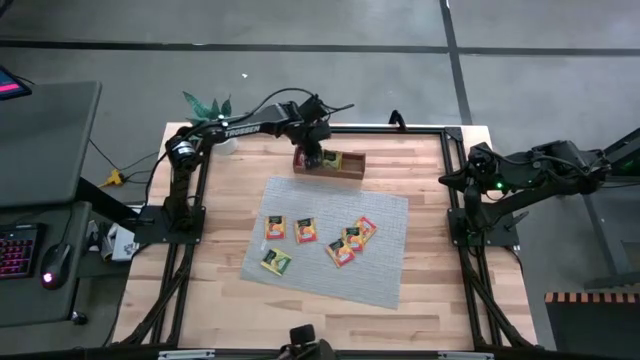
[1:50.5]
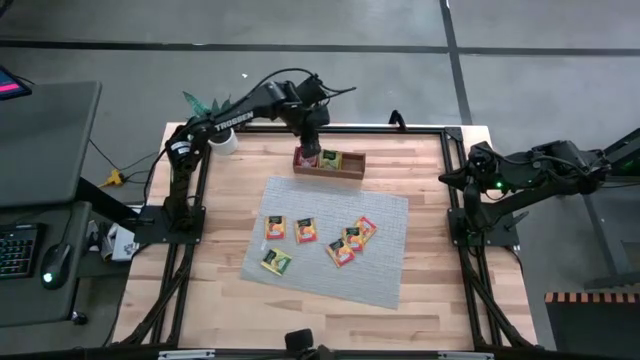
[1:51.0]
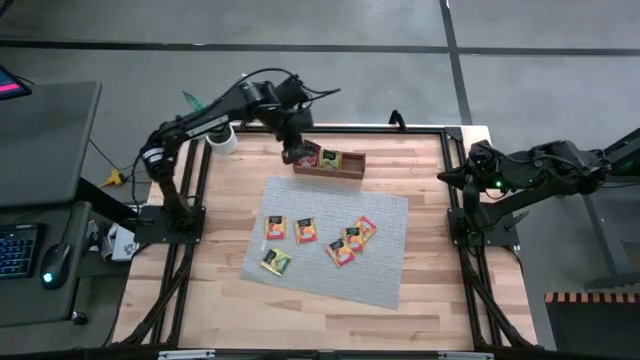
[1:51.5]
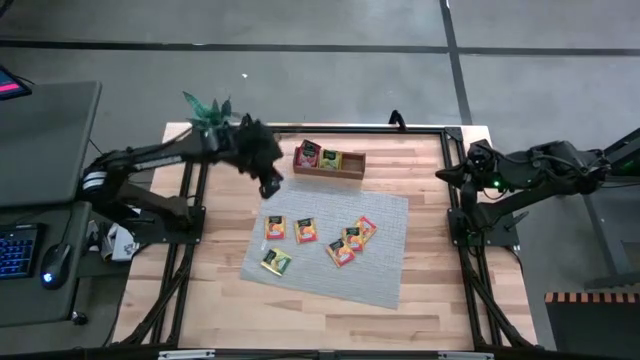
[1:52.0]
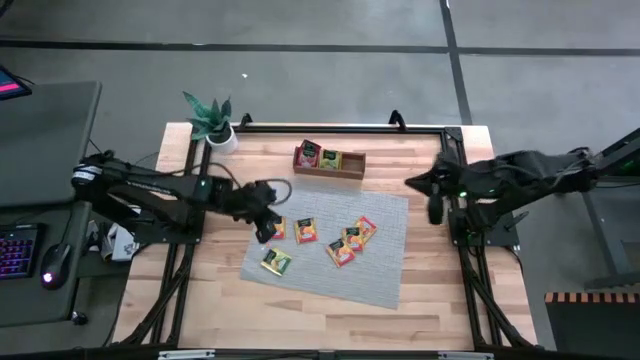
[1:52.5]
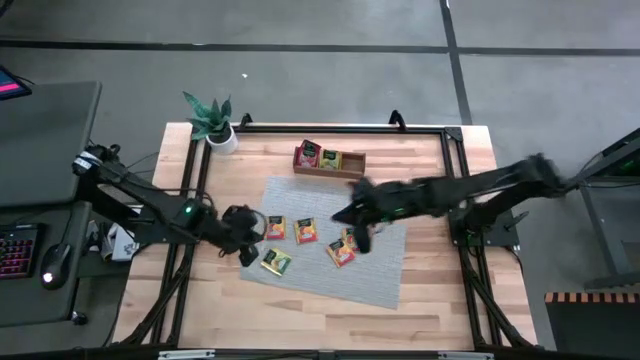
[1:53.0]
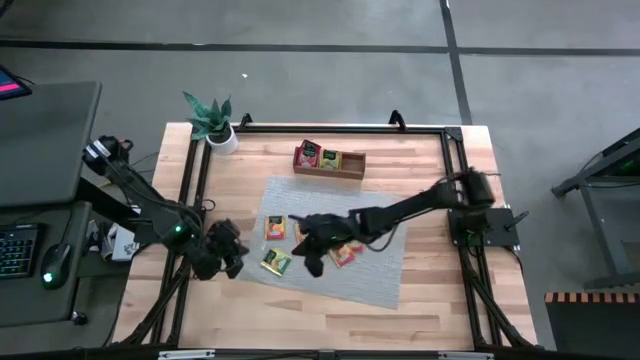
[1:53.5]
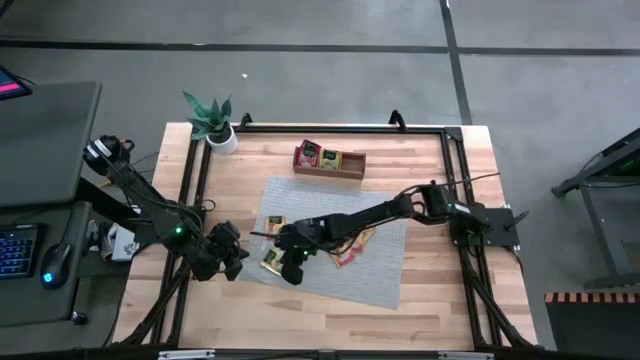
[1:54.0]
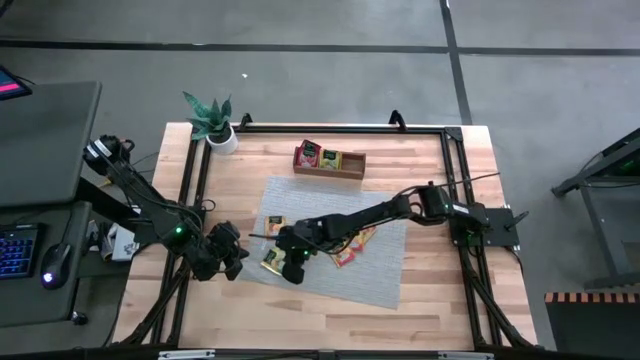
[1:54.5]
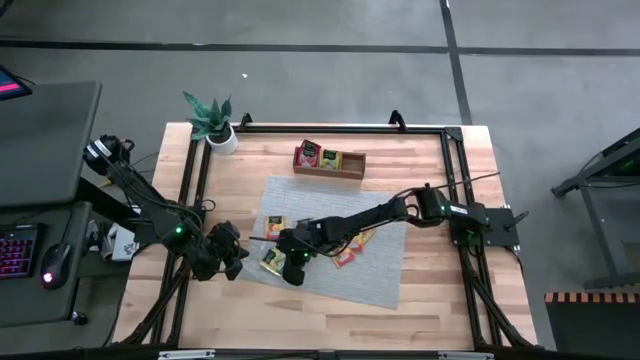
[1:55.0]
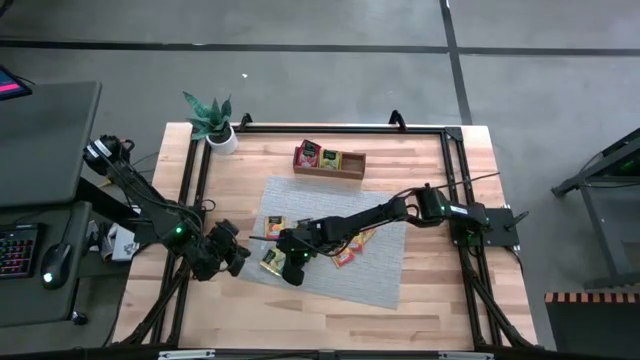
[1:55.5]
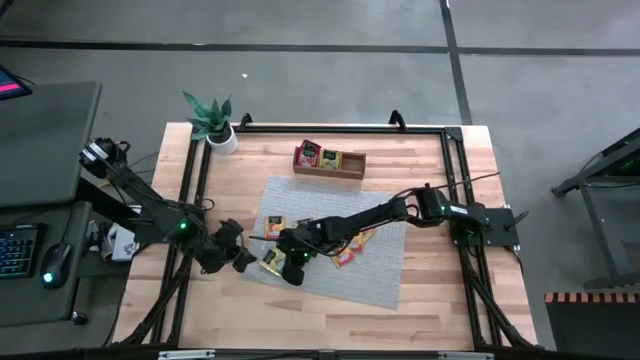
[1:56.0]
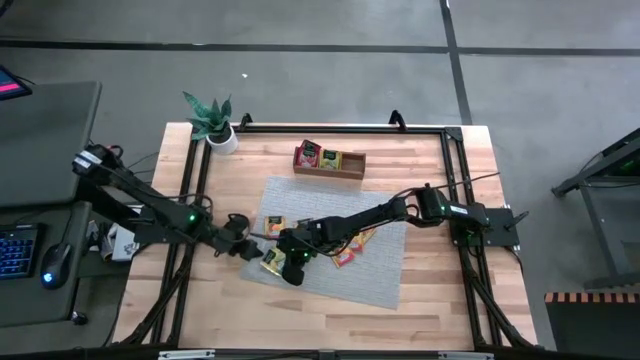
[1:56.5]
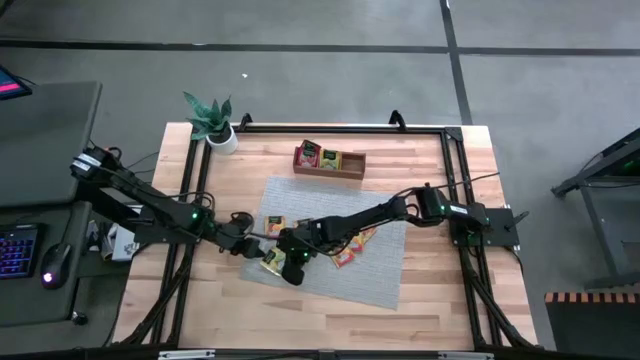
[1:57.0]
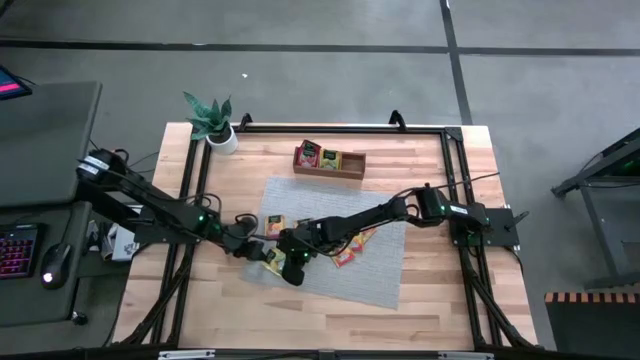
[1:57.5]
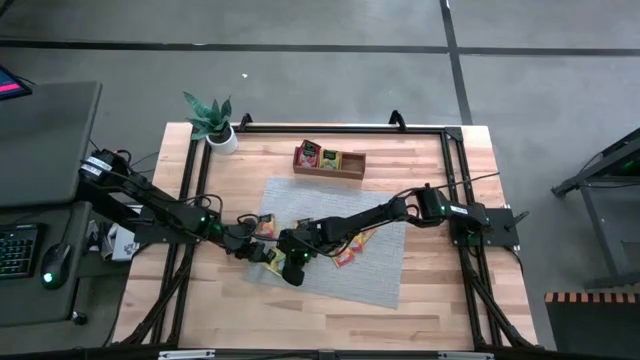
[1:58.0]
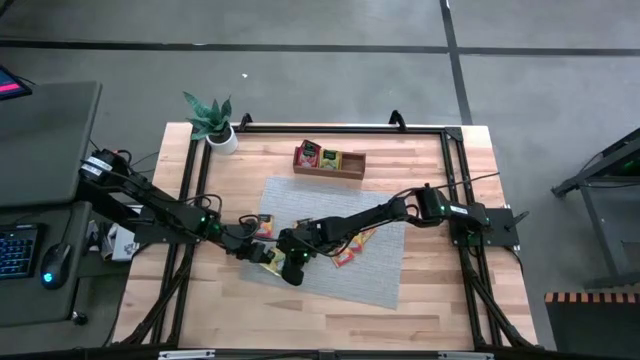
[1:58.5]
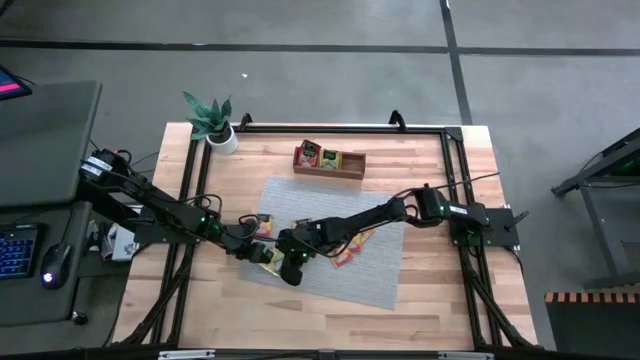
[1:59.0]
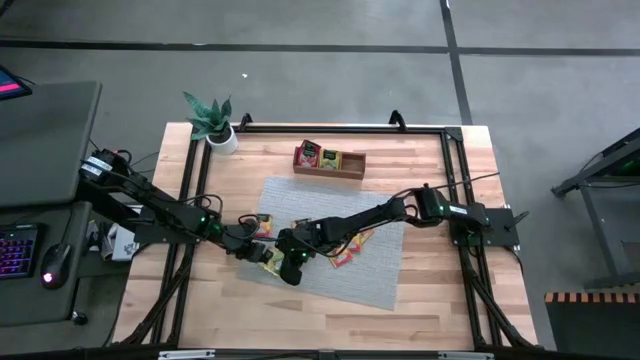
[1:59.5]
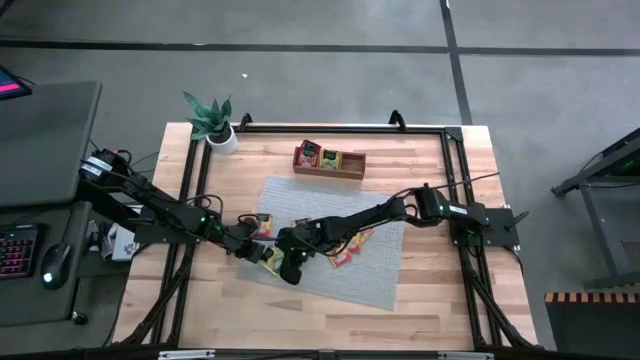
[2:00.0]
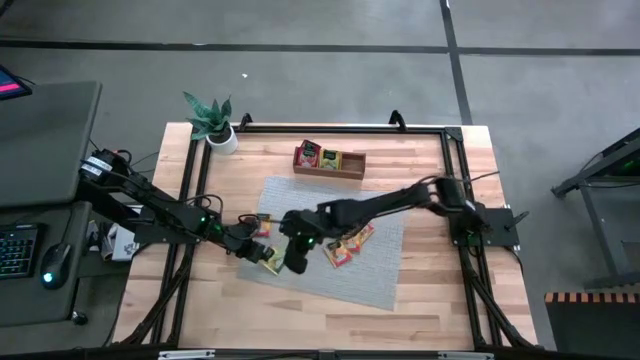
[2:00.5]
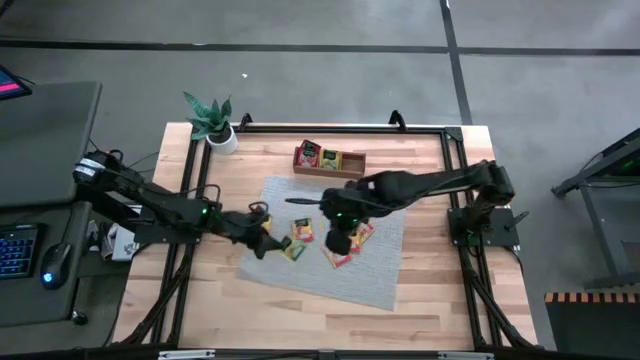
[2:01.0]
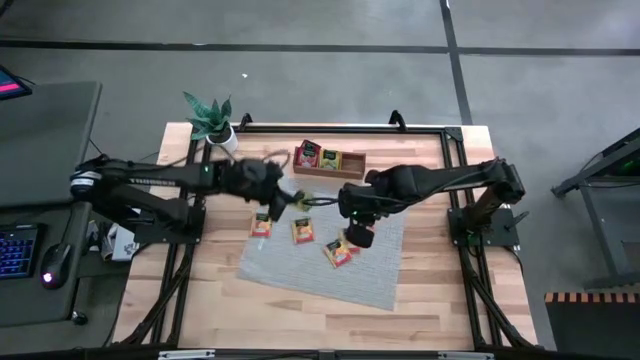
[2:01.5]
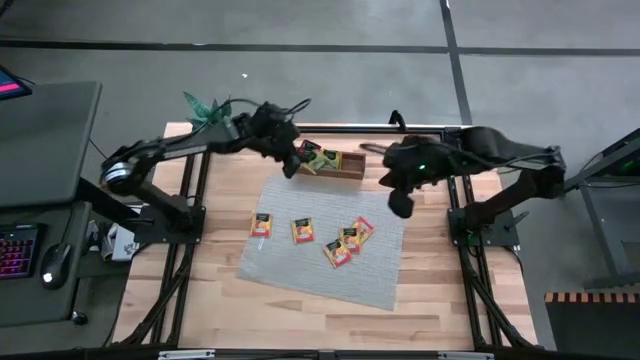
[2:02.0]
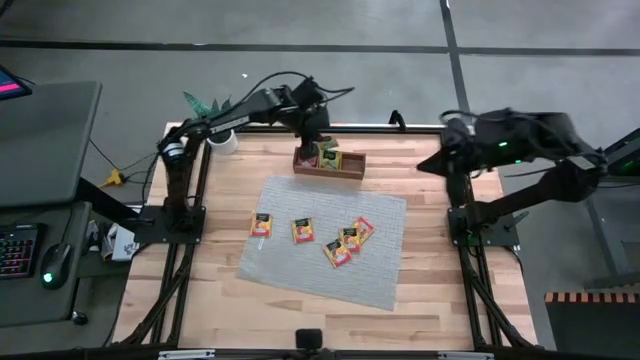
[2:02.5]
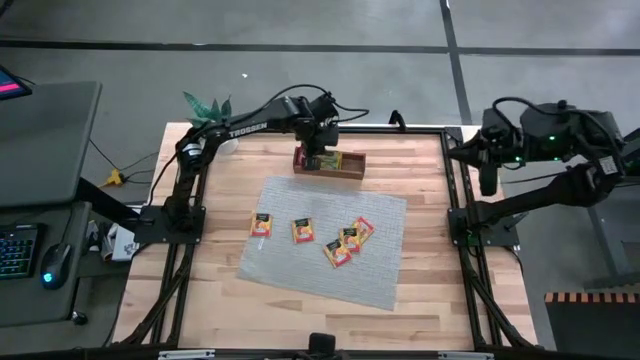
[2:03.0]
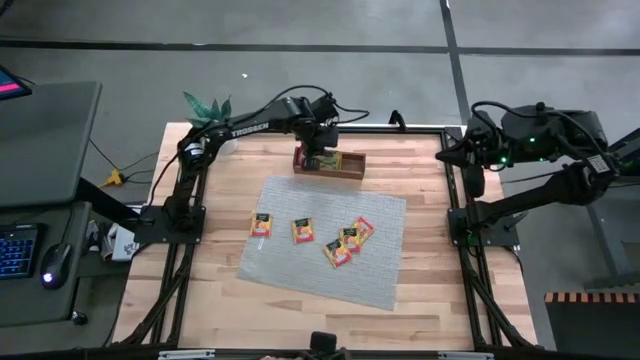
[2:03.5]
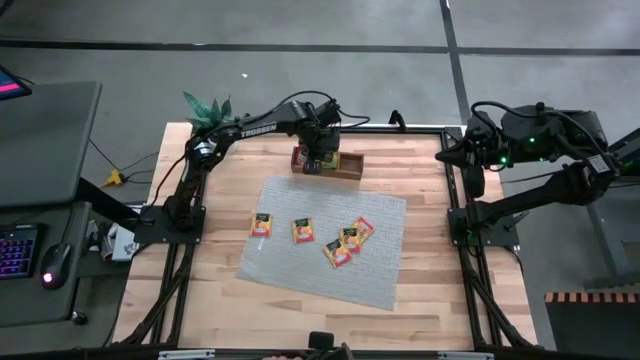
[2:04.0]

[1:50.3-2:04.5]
Task: Pick & Place Tea
Put the yellow tea bag into the middle section of the wooden organizer

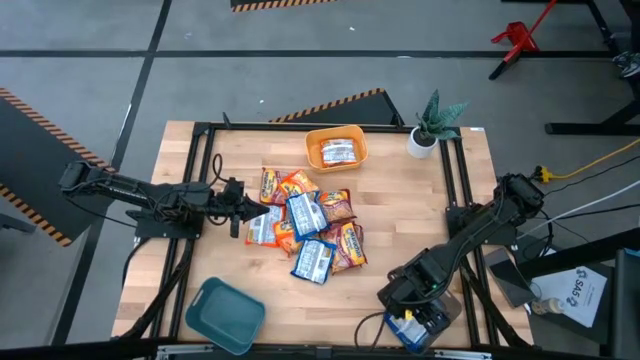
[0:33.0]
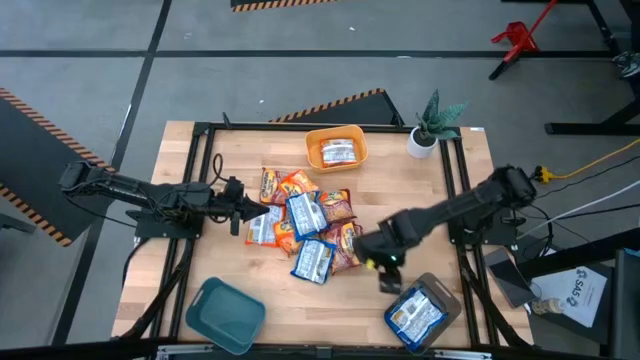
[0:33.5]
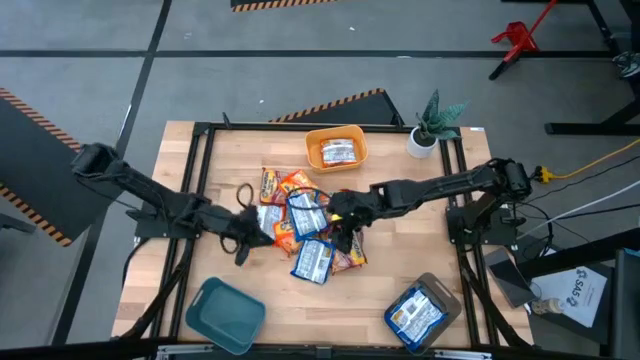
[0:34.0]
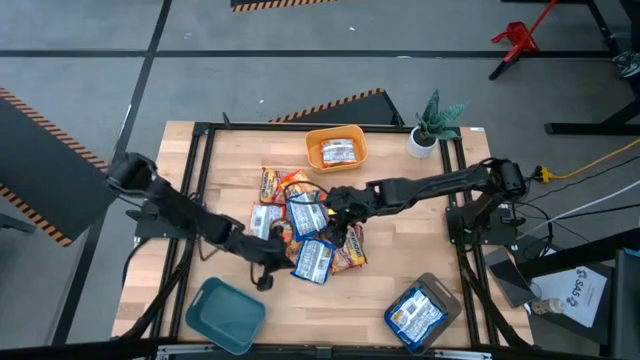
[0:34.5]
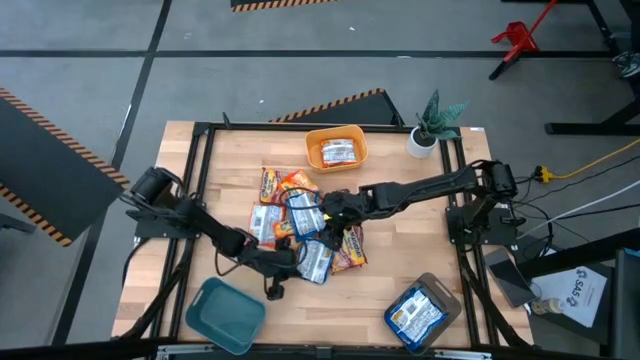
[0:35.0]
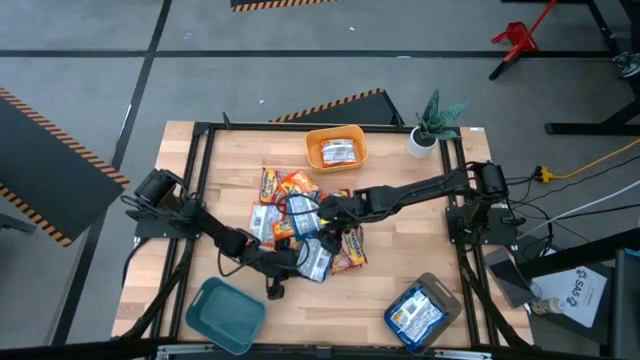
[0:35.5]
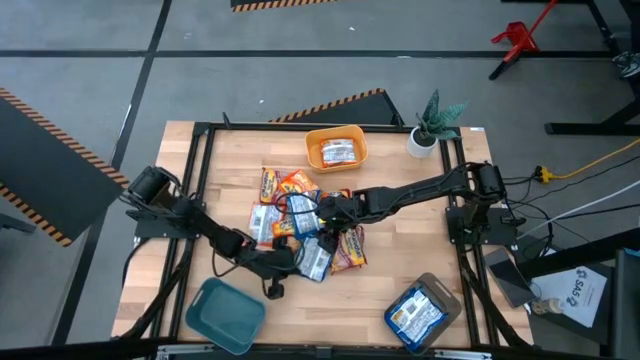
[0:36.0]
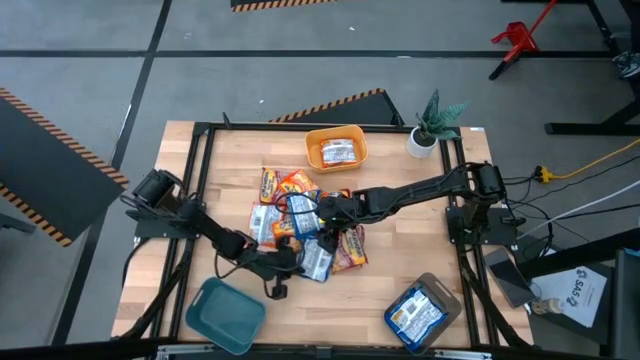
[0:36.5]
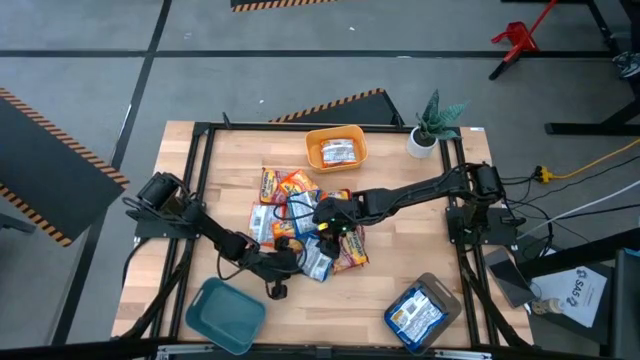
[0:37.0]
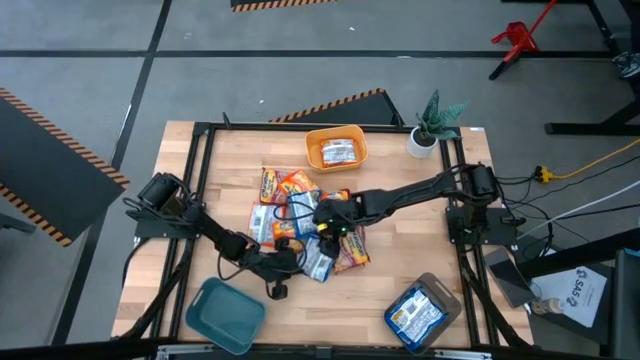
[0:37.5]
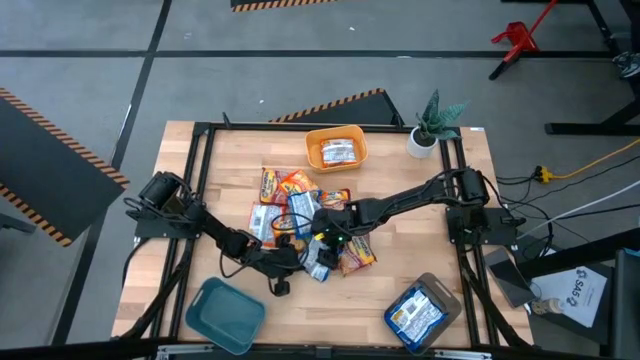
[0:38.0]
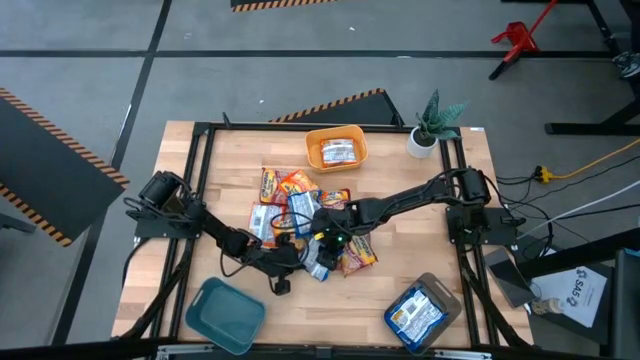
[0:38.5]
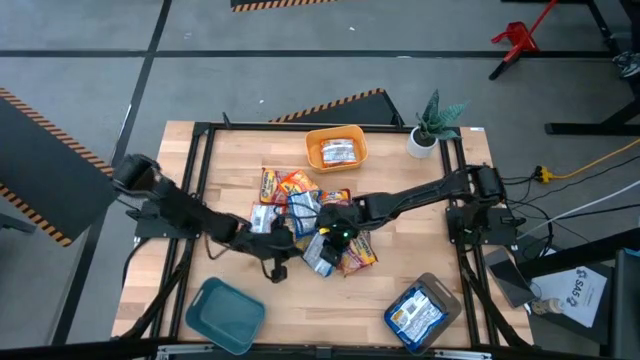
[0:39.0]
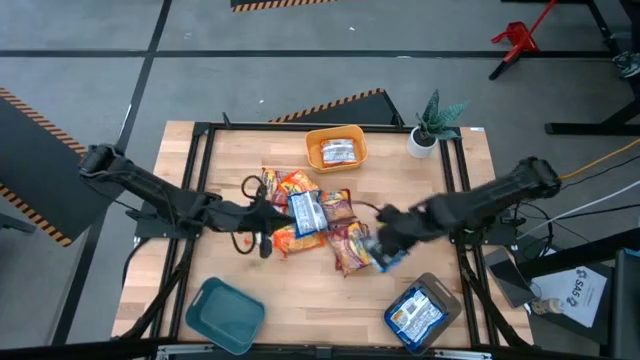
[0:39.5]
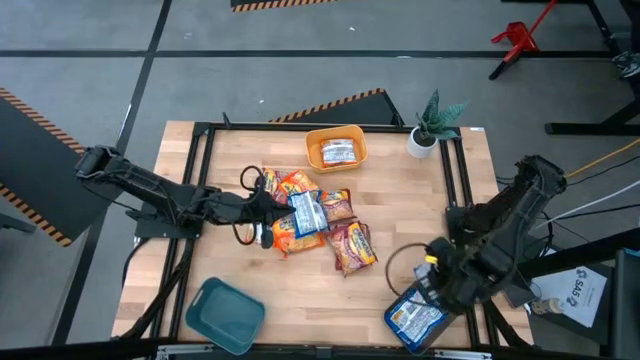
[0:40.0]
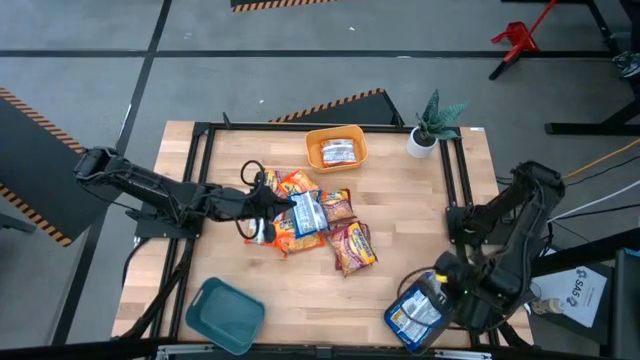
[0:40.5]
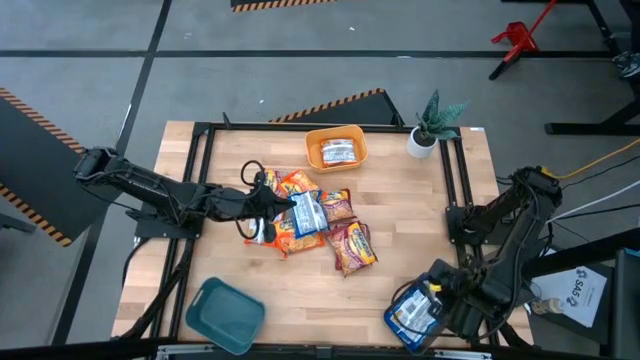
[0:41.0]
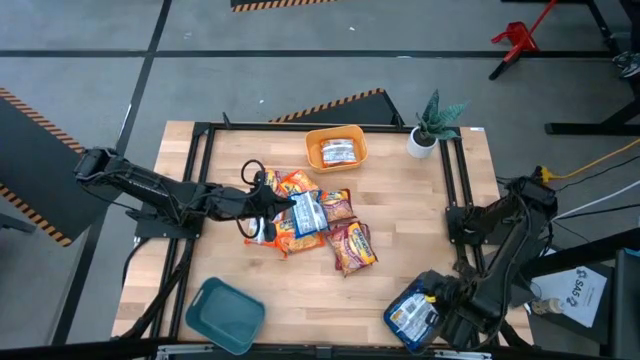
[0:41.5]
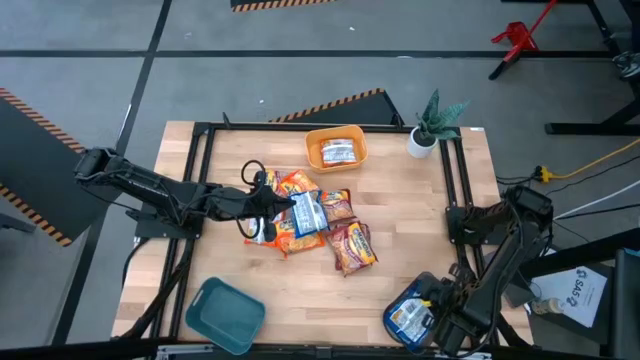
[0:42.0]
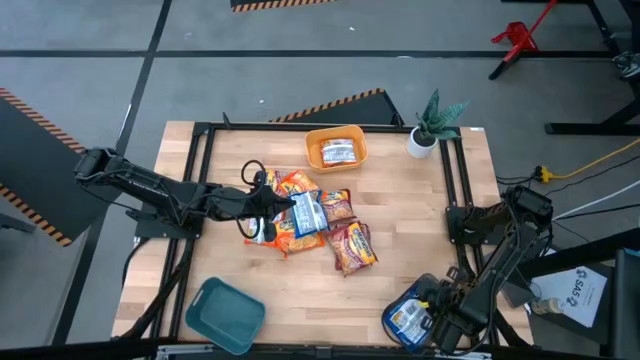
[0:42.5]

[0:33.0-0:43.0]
Task: Sort Maruchan noodles
Put the blue noodle pack into the black bin
